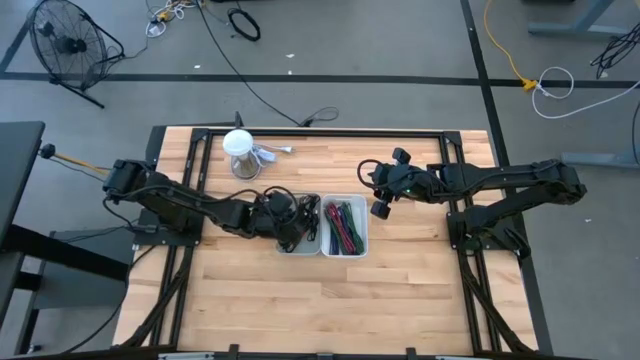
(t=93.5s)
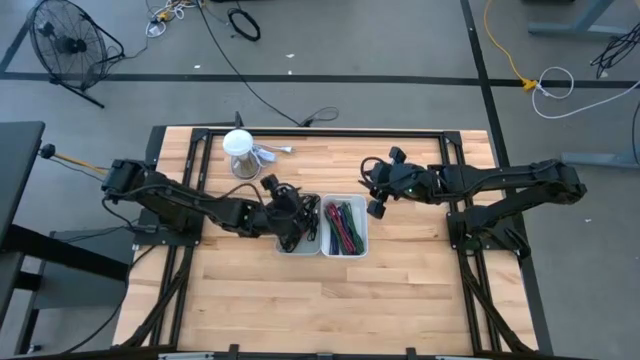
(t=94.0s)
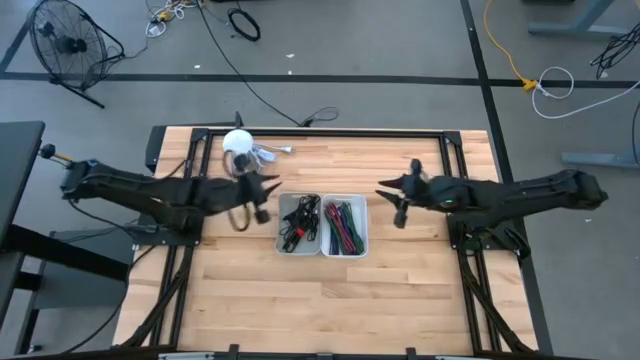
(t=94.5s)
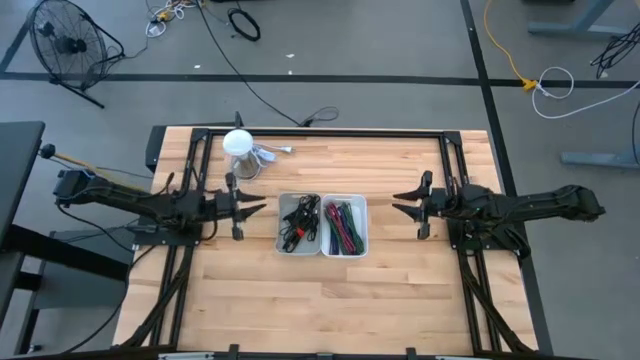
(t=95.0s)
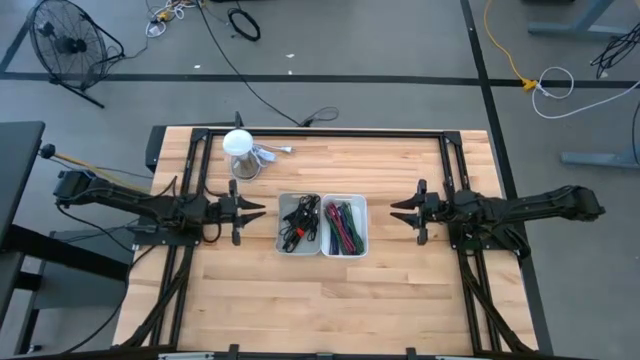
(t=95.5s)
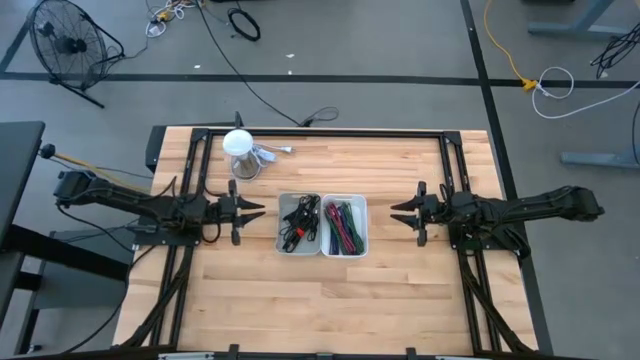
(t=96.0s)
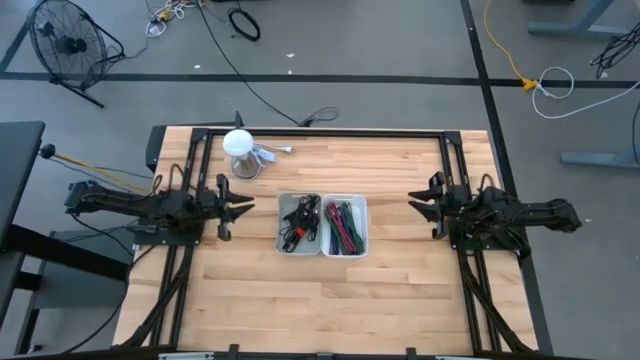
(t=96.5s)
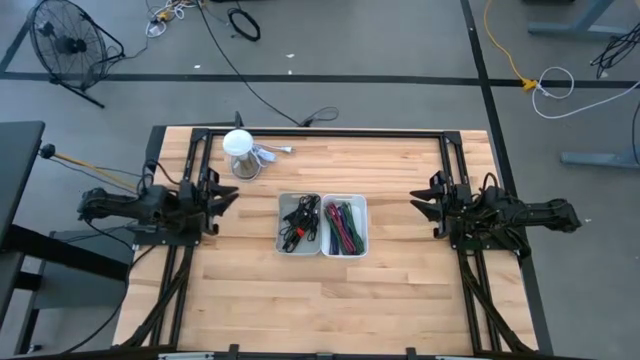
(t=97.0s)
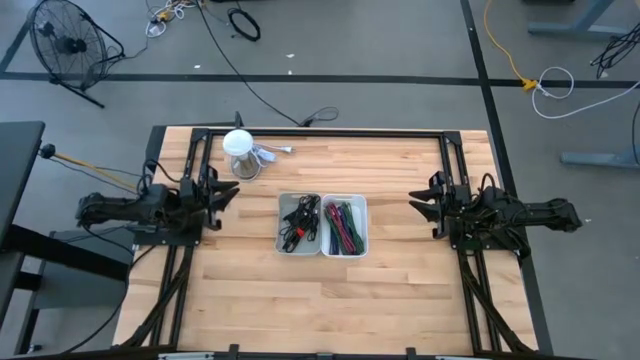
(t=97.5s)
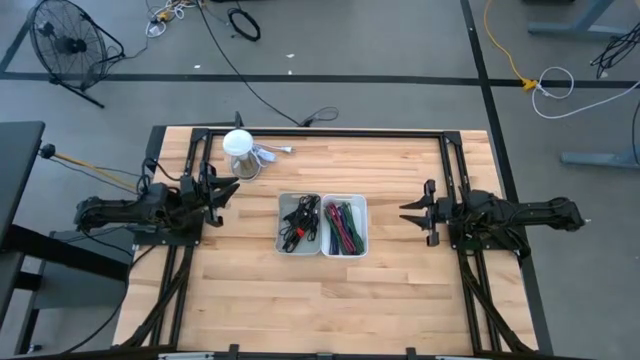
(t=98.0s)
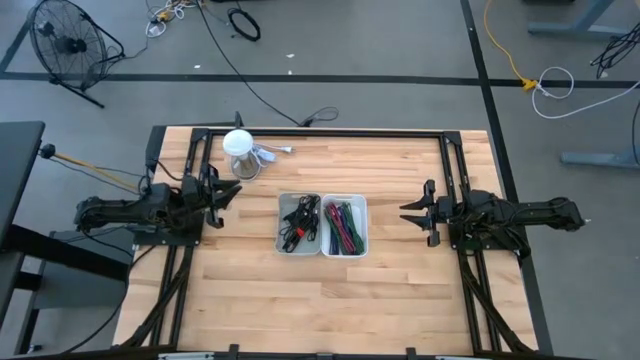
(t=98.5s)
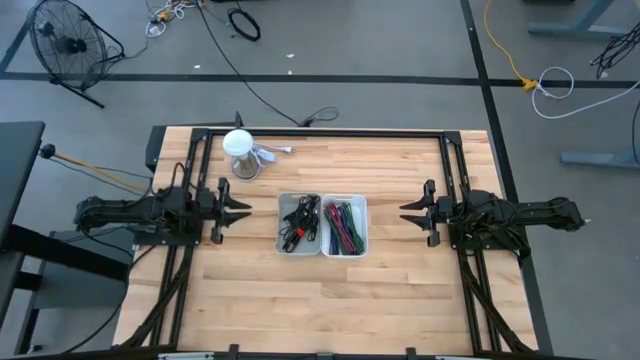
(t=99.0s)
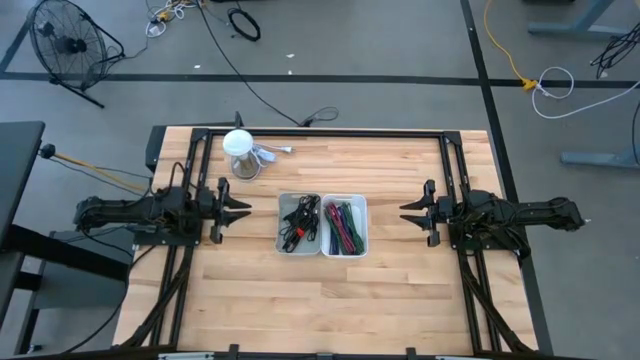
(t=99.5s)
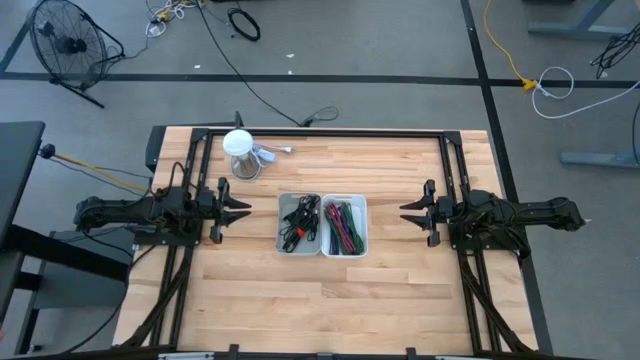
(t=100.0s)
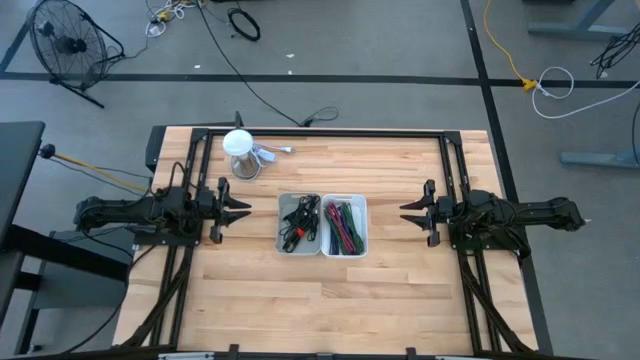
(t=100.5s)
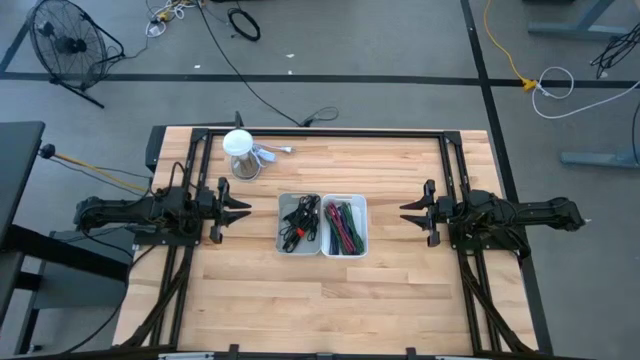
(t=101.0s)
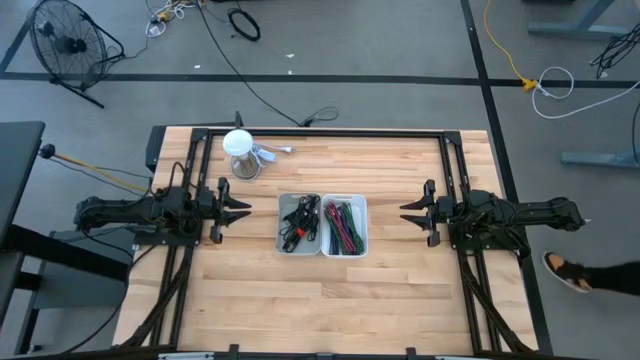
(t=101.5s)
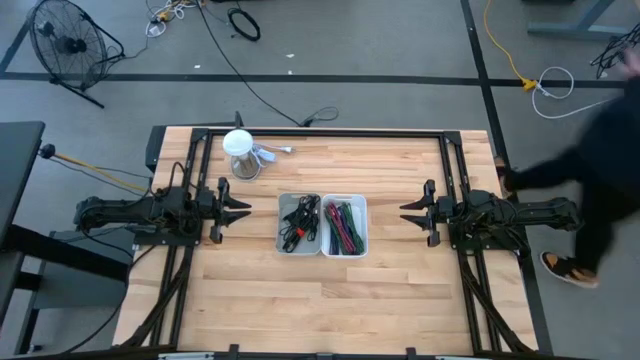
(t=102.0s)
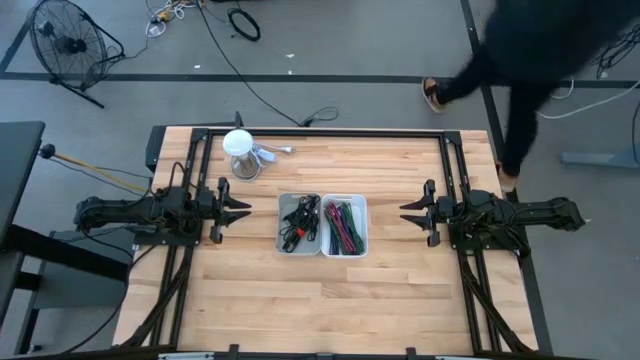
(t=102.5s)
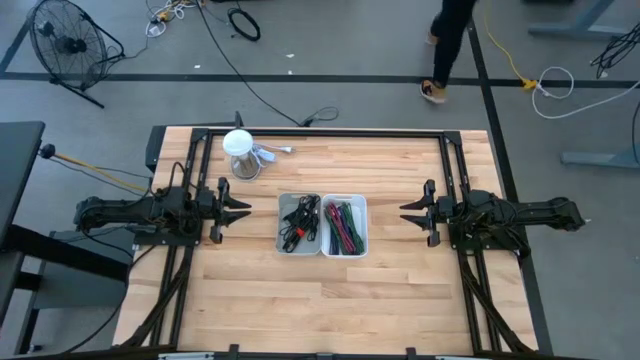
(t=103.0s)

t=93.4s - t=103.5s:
Task: Pick & Place USB Port
Return to Home Position

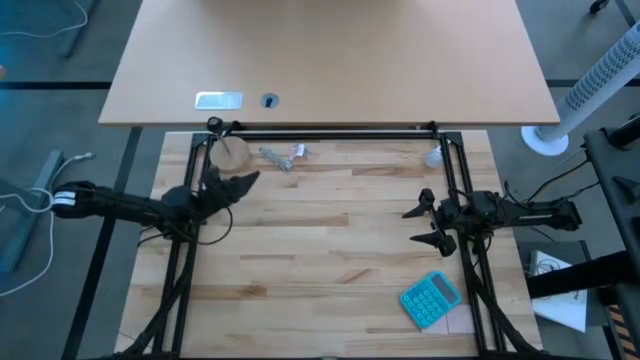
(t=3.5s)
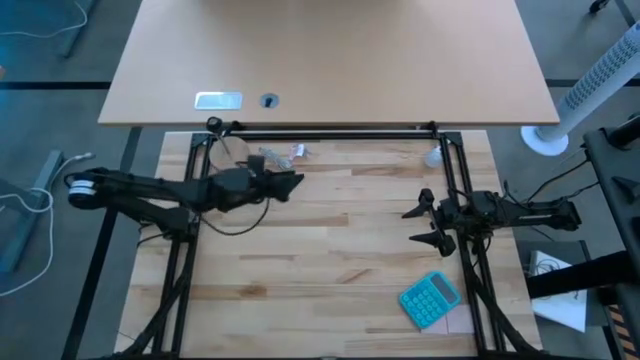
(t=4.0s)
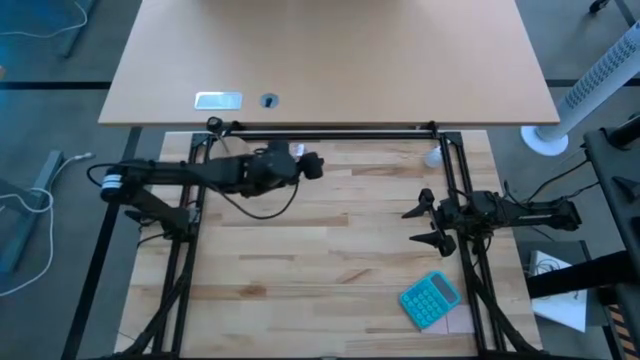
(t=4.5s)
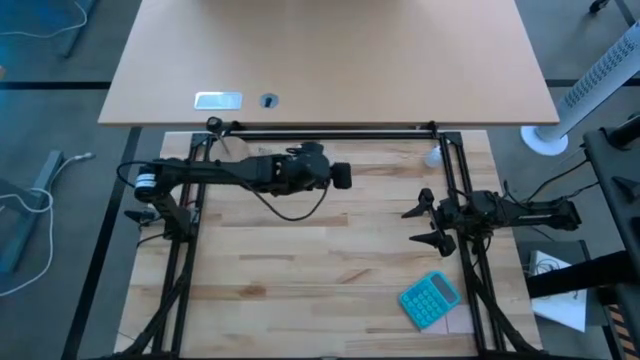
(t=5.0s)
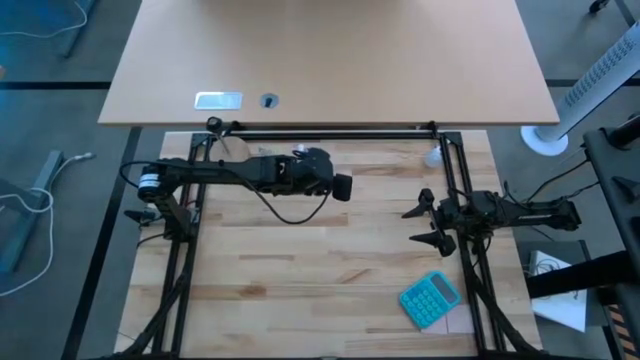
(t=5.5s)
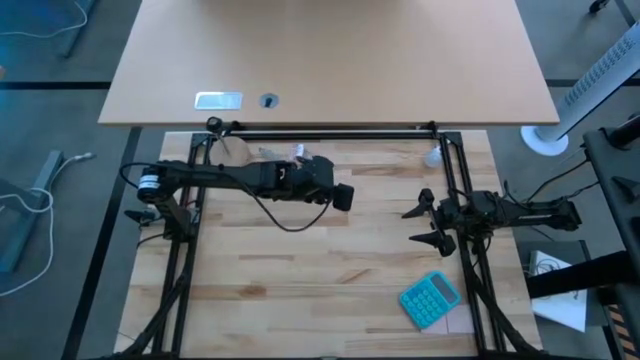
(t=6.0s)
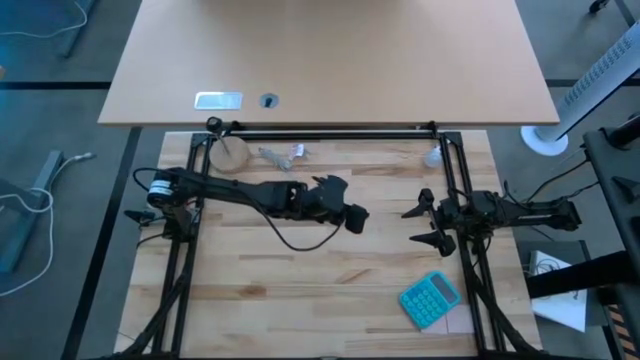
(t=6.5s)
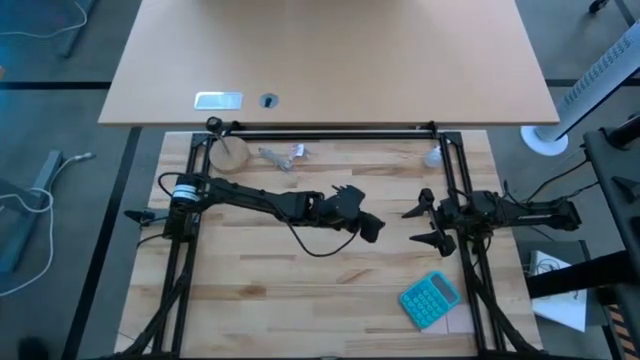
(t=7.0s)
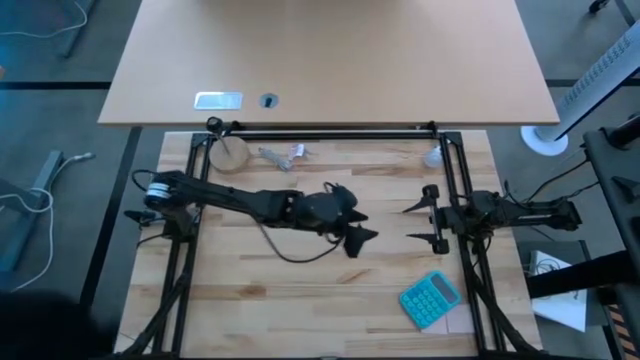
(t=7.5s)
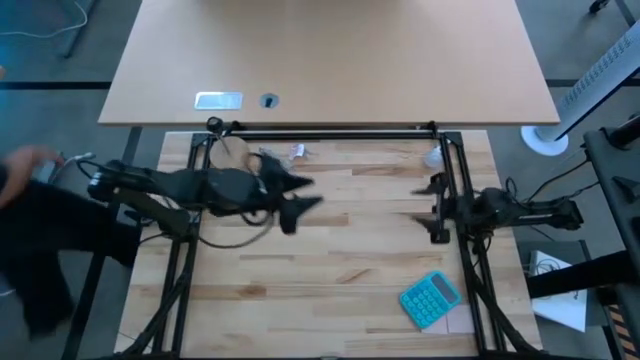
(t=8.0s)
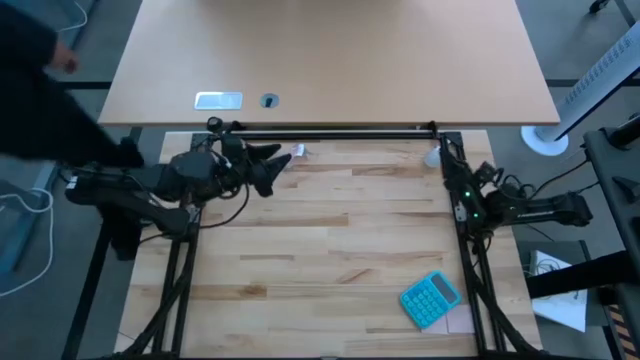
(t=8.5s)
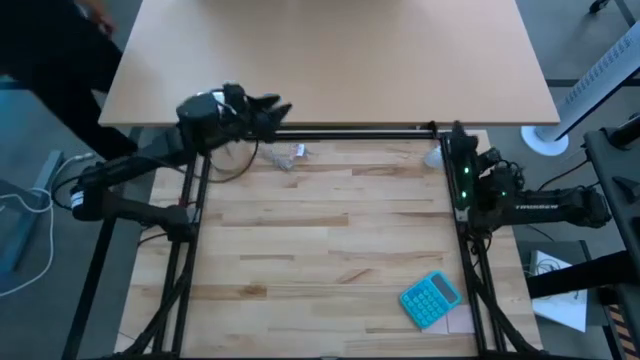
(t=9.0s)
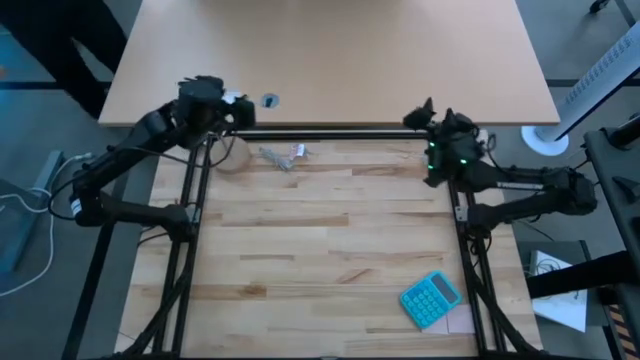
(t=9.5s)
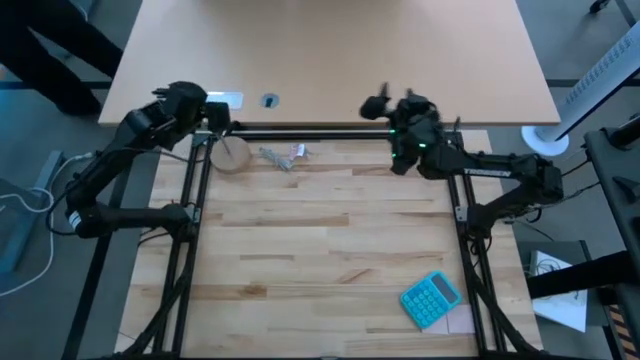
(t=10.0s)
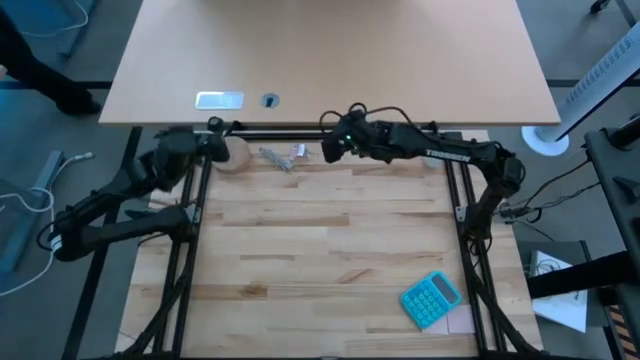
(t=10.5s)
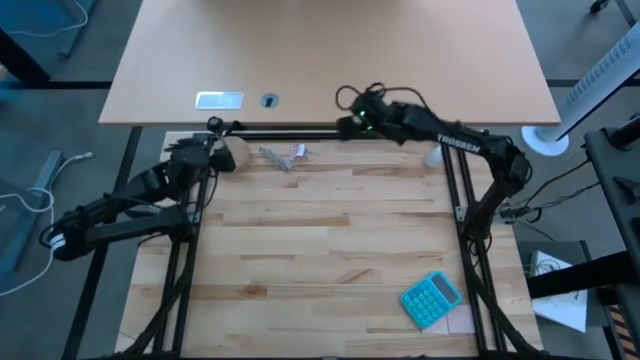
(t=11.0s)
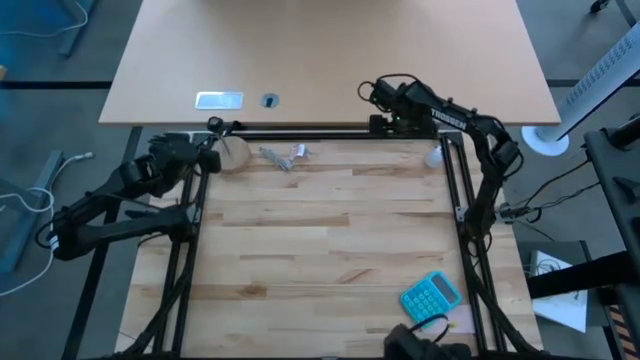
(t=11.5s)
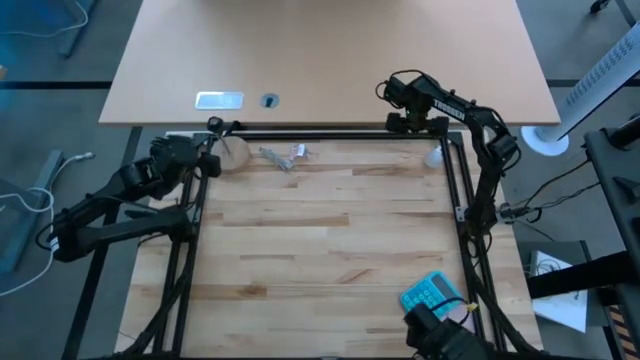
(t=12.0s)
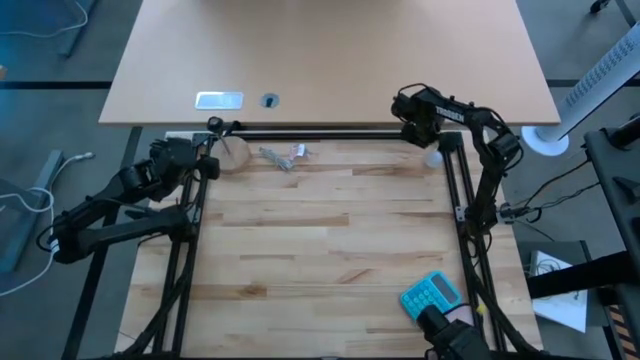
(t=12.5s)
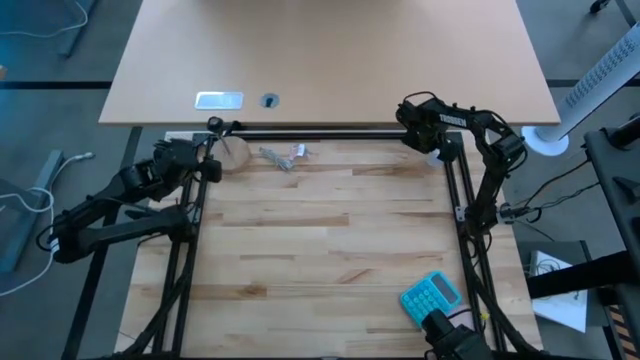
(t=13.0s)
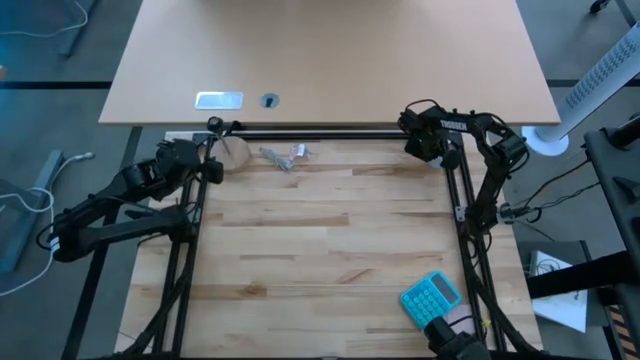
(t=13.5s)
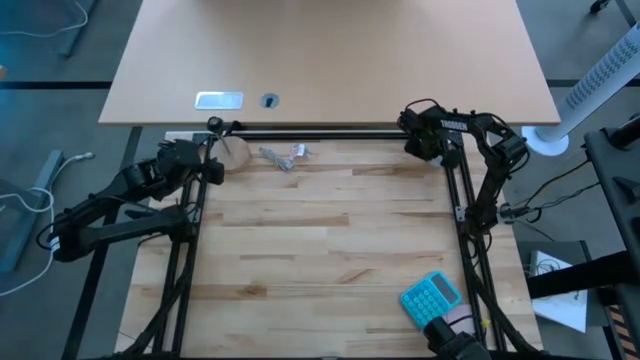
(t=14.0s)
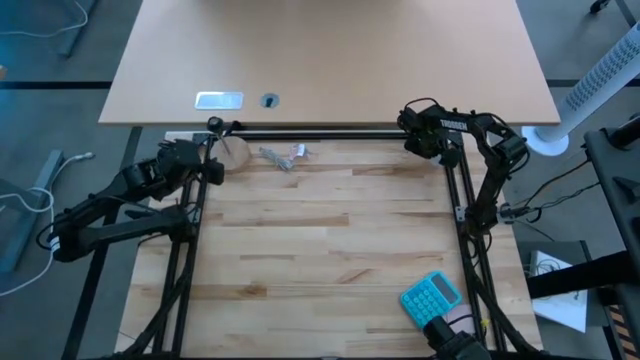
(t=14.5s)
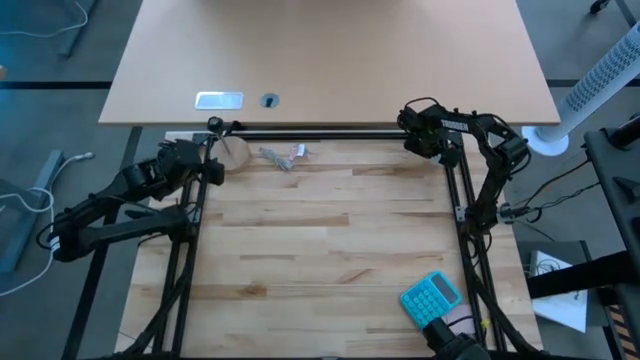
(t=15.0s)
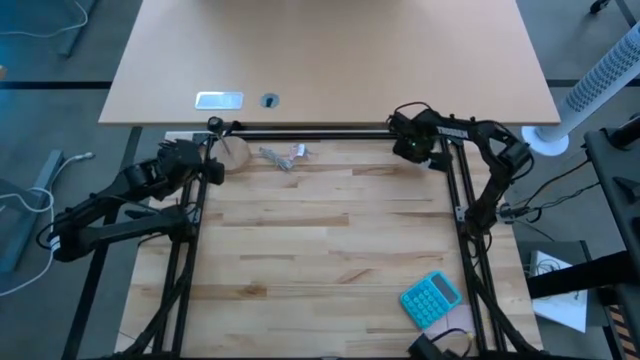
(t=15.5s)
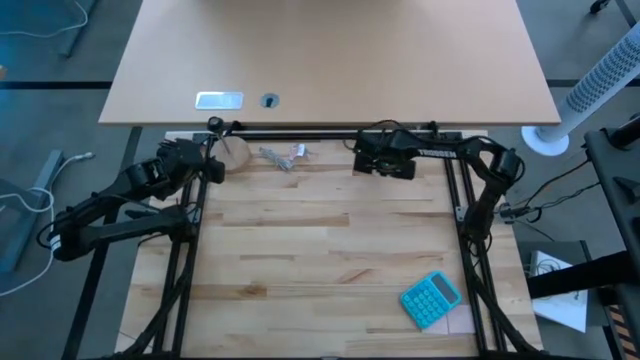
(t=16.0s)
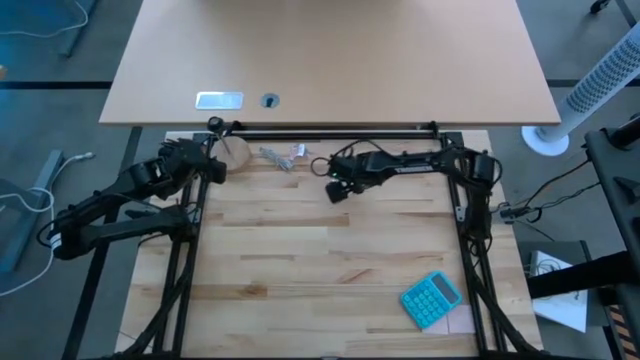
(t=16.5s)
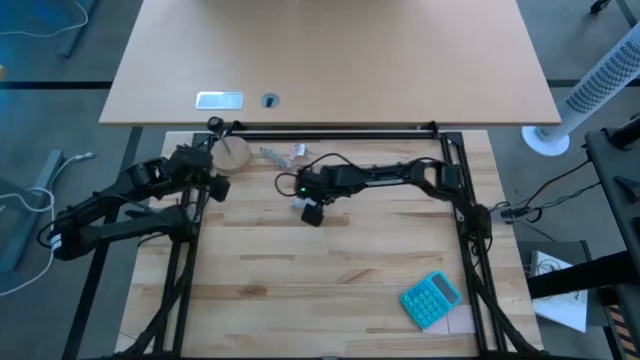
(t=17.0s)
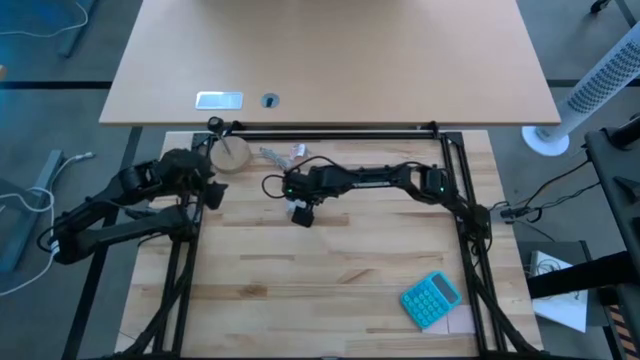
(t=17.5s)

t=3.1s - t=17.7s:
Task: Screw lightbulb
Move the lightbulb to the center of the table
